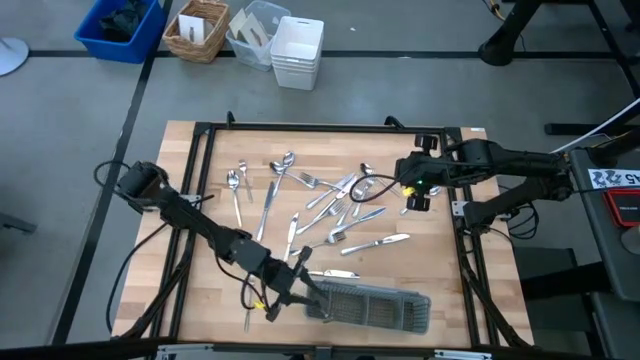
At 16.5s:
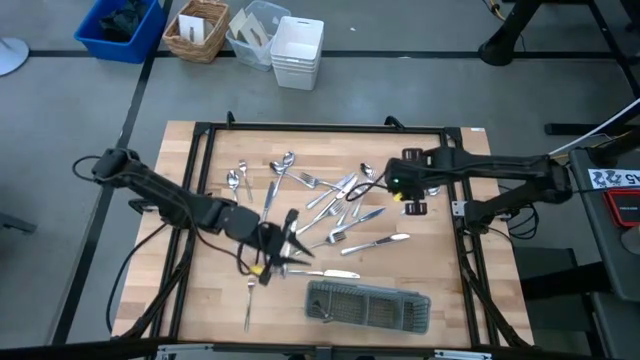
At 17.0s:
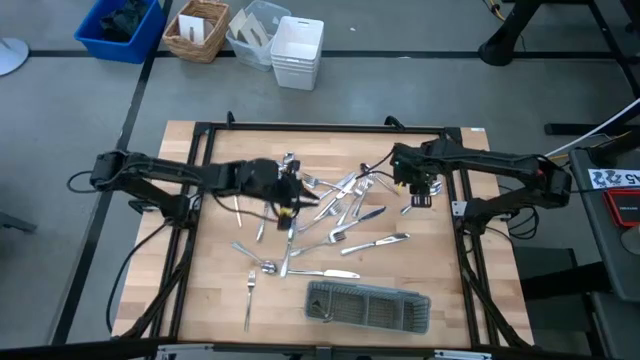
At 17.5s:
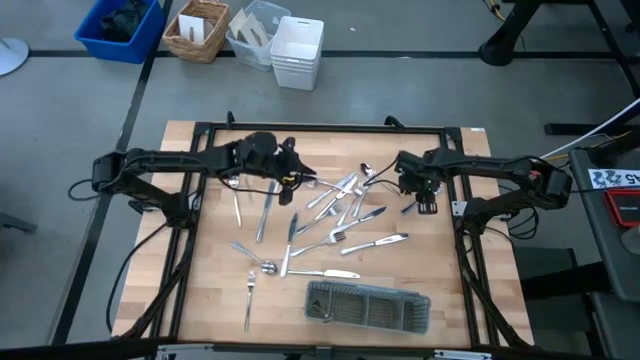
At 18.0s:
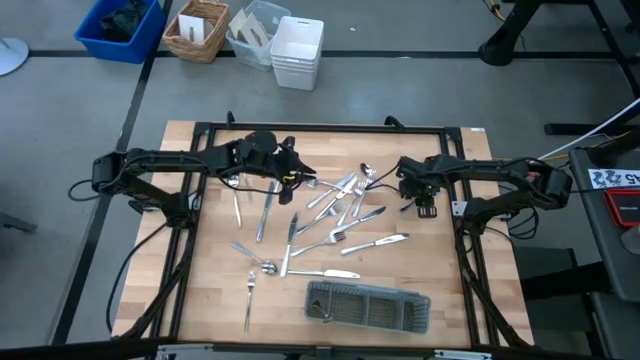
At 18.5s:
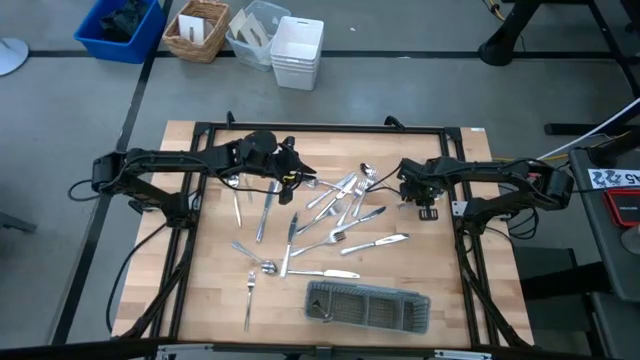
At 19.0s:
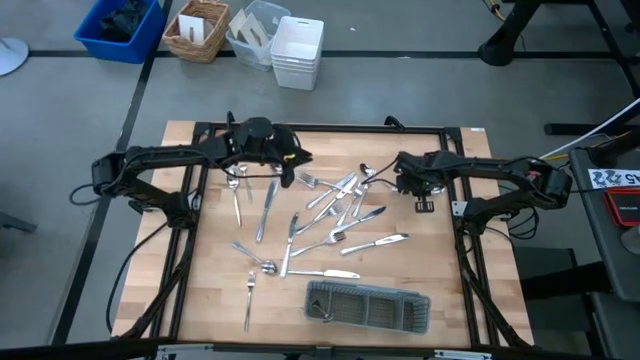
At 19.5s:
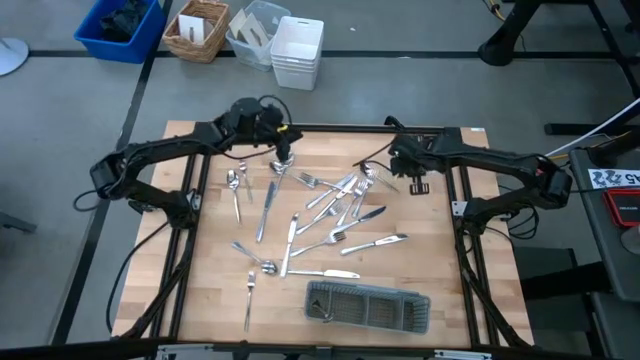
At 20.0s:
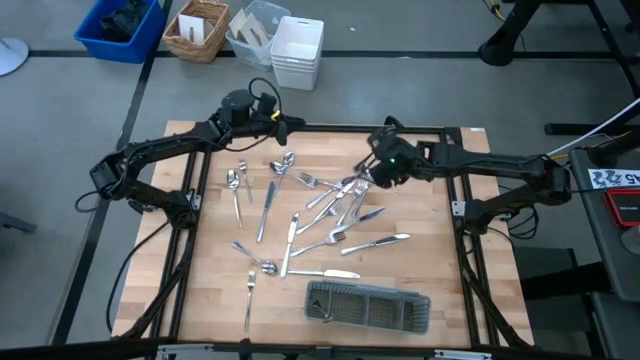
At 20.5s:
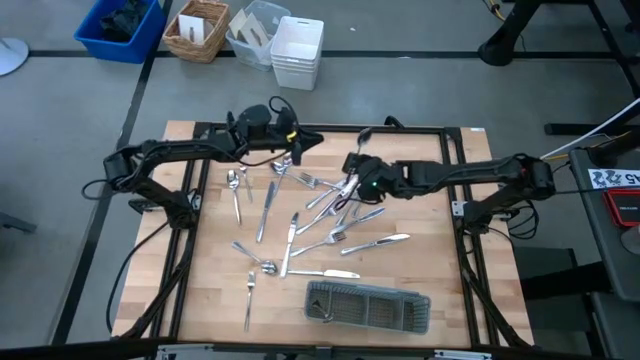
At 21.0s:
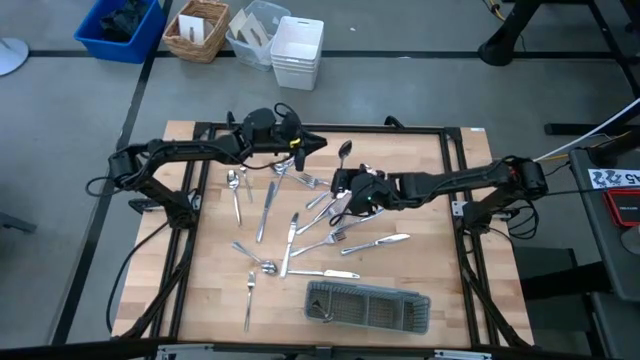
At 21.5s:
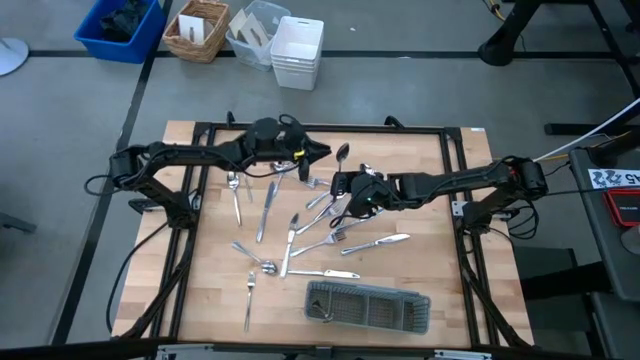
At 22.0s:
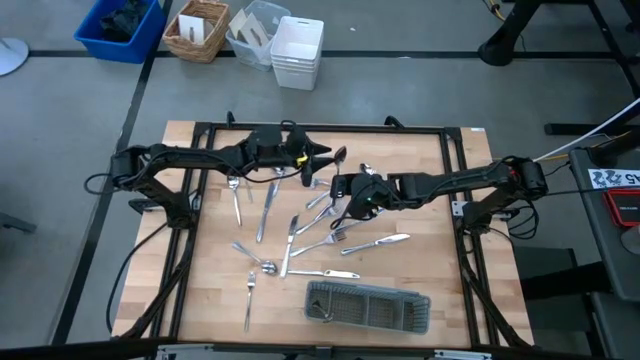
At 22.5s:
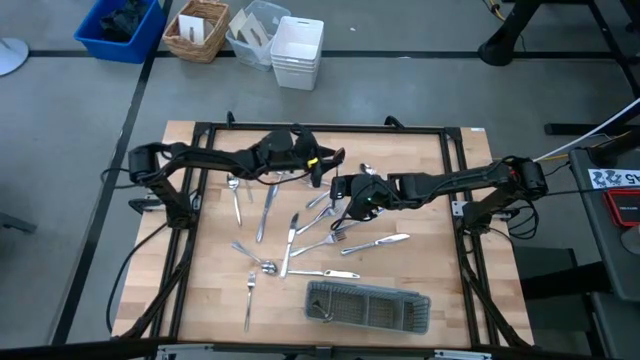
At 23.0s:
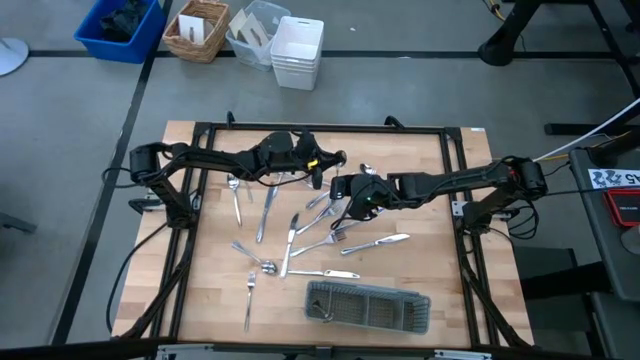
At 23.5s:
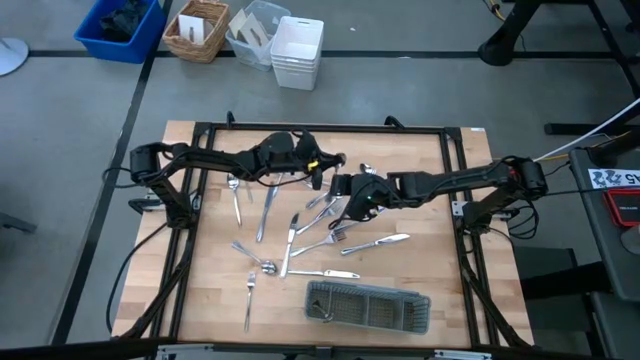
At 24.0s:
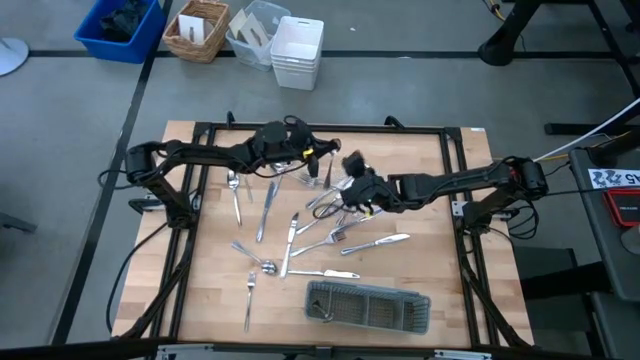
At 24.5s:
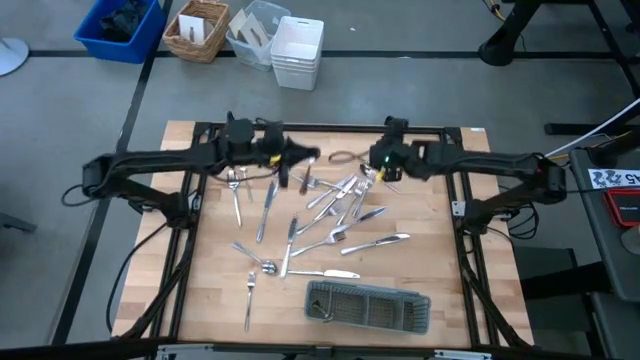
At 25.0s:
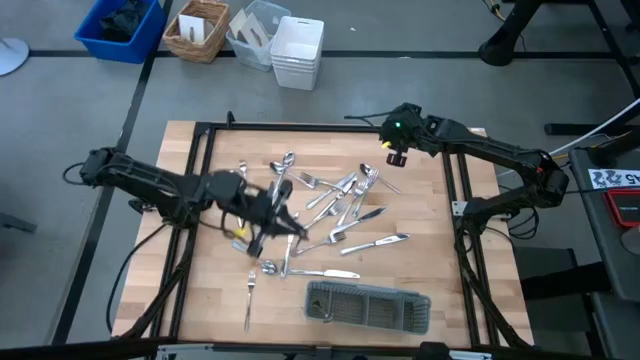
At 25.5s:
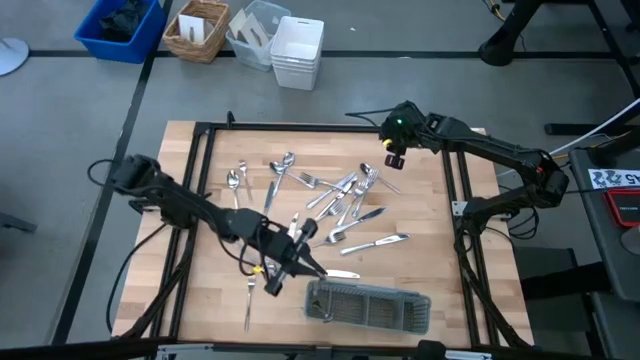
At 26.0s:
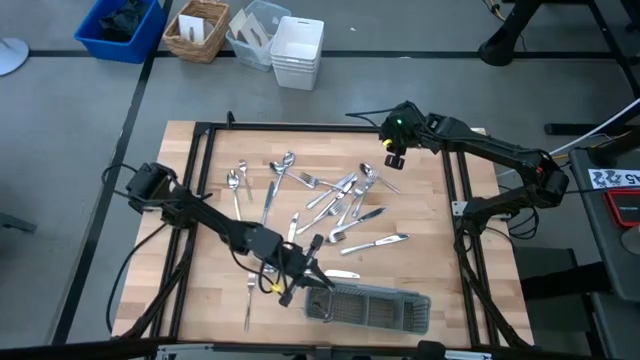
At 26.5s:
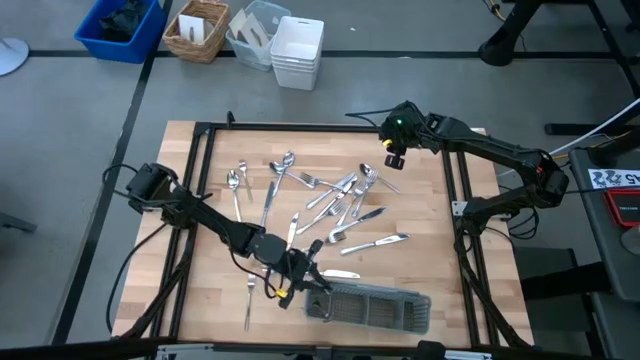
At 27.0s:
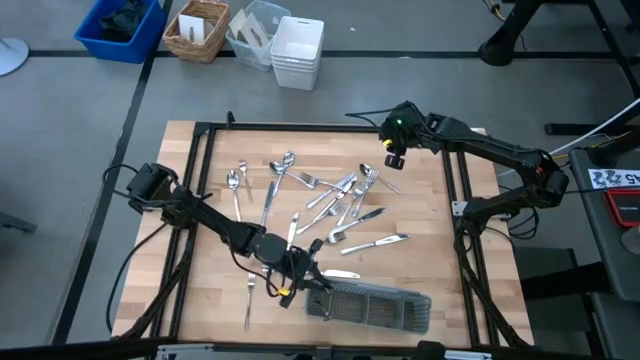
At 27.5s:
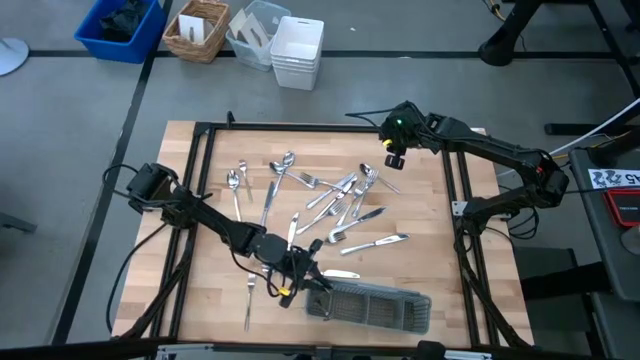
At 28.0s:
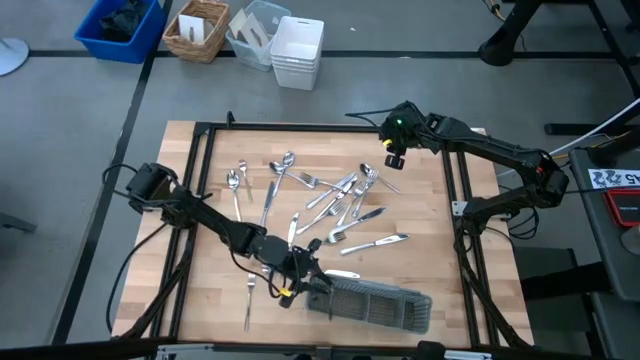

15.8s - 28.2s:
Task: Sort silverware
Put the spoon into the gray silverware rack

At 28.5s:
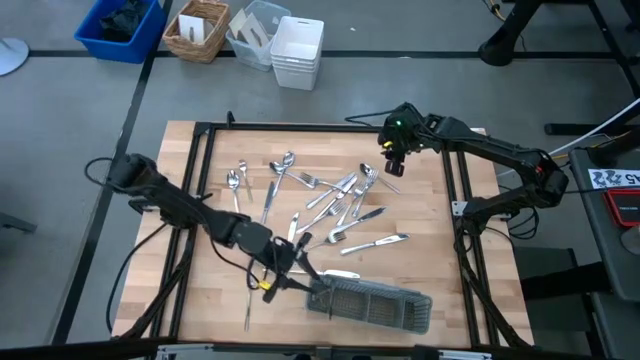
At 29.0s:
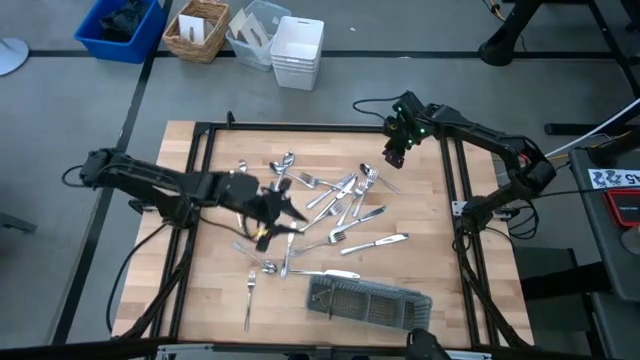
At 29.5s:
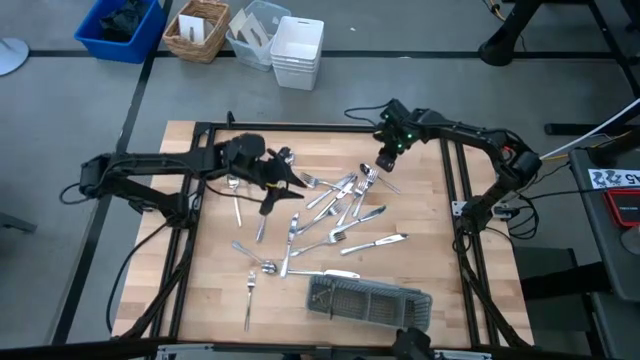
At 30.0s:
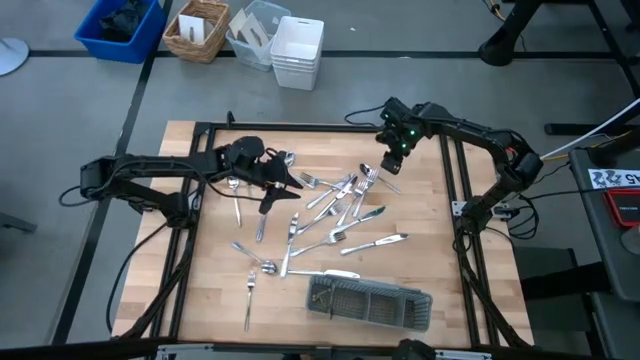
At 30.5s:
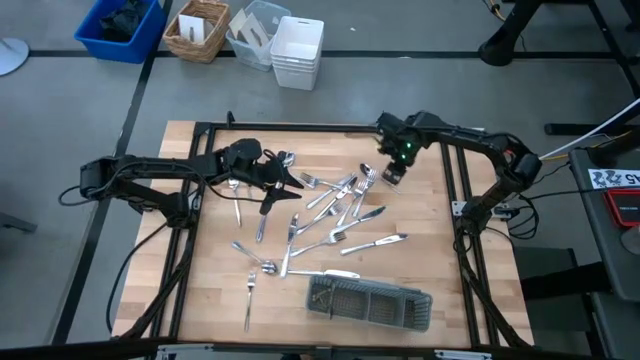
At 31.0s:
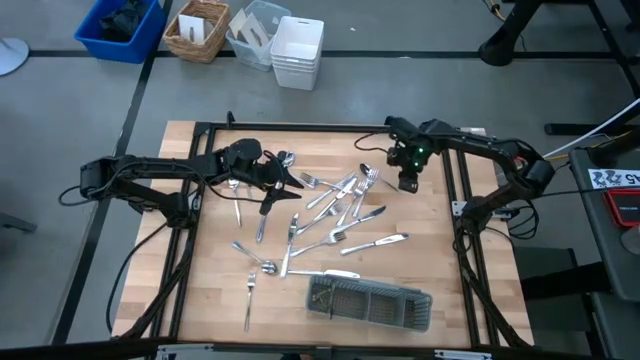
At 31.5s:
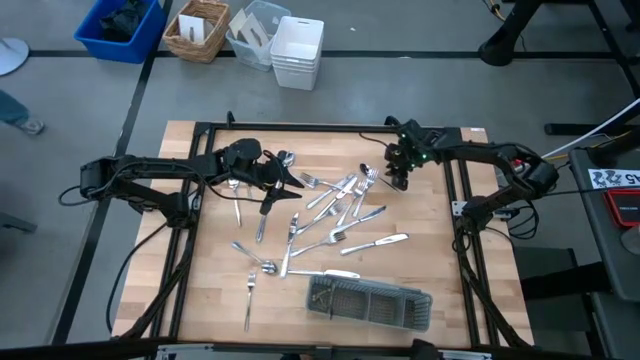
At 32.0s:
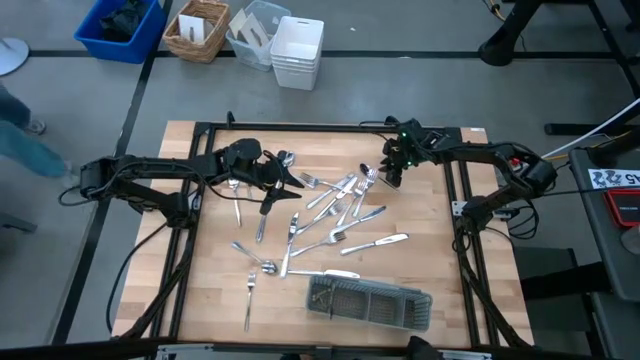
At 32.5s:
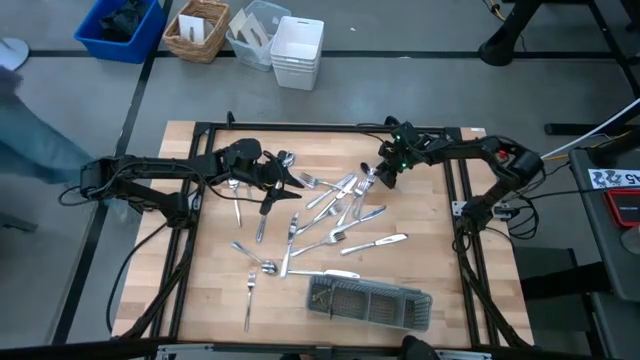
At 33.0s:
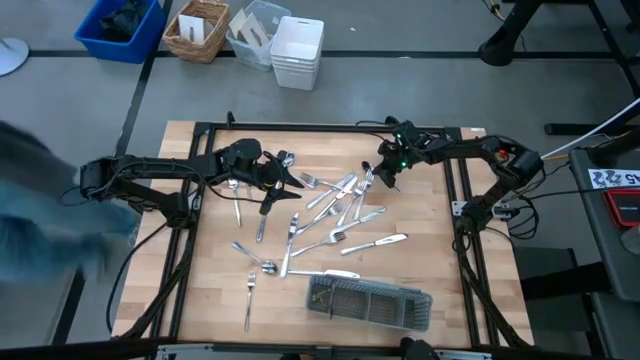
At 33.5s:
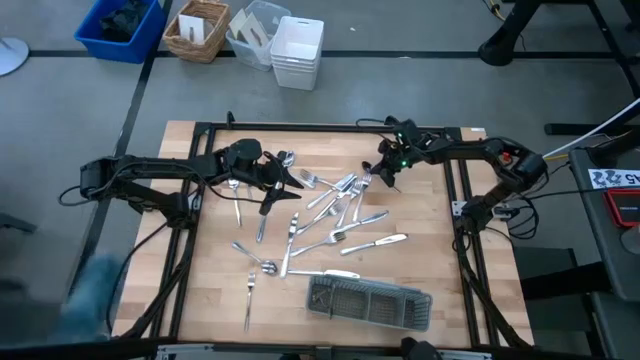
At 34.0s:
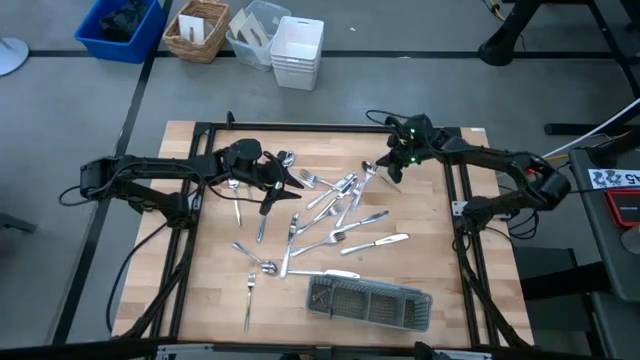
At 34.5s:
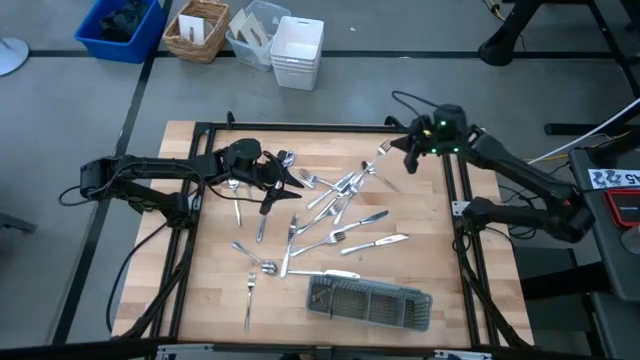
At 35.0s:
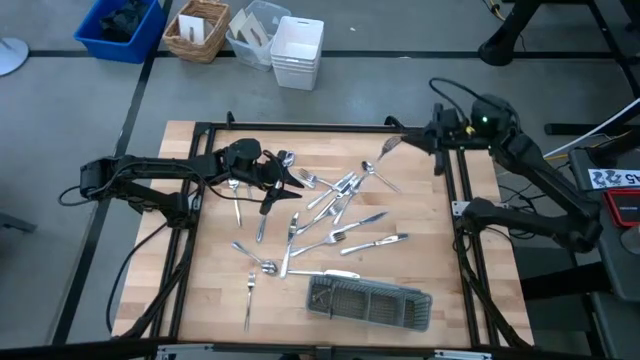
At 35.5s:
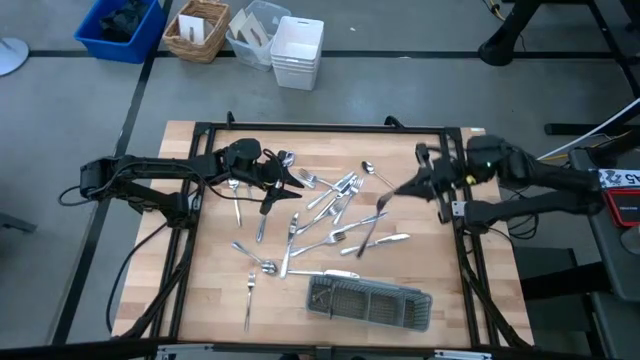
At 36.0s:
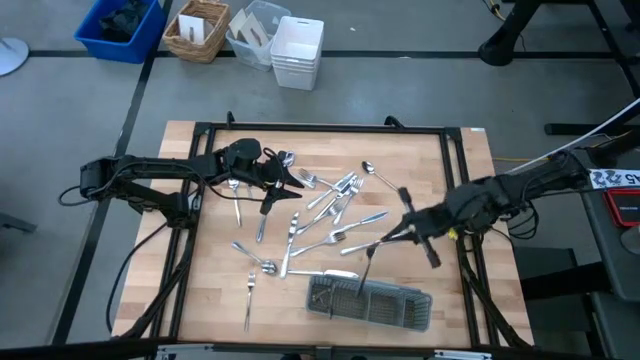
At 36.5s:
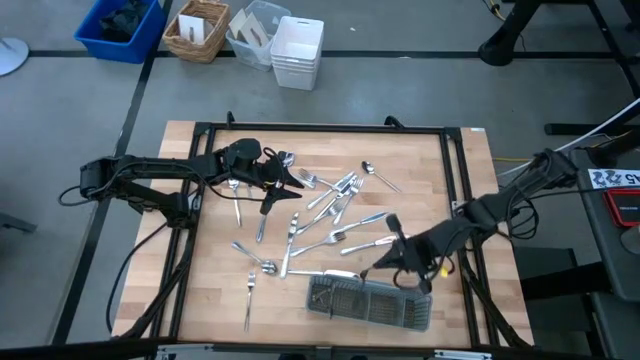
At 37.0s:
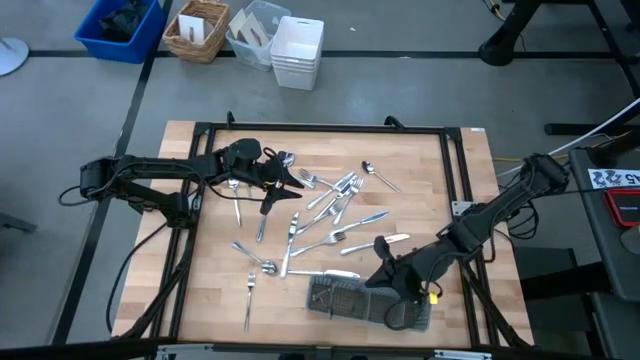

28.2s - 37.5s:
Put the fork into the gray silverware rack

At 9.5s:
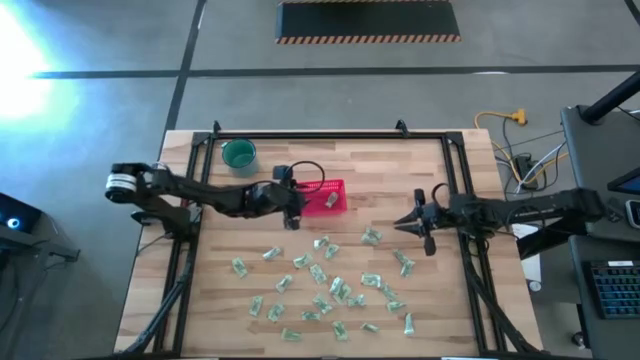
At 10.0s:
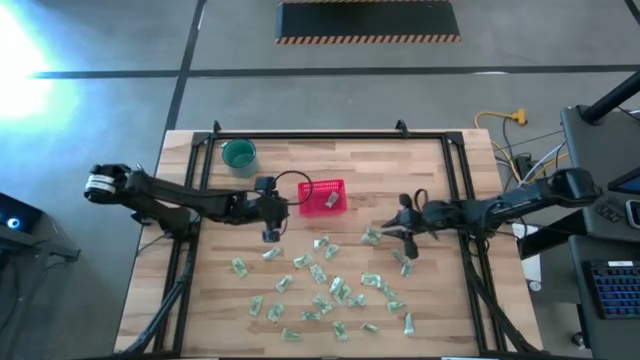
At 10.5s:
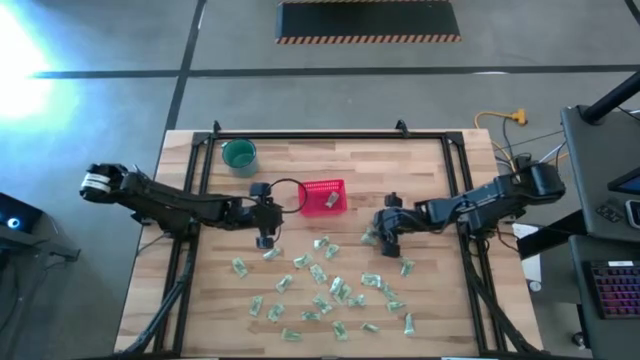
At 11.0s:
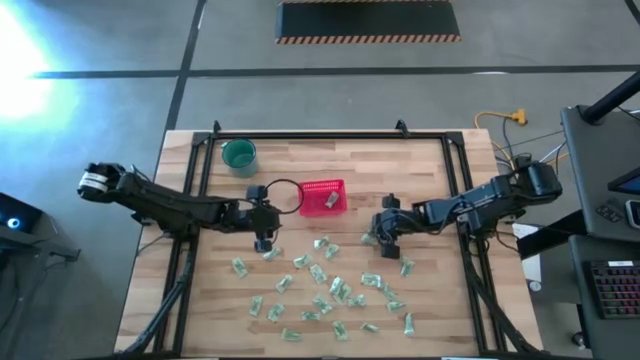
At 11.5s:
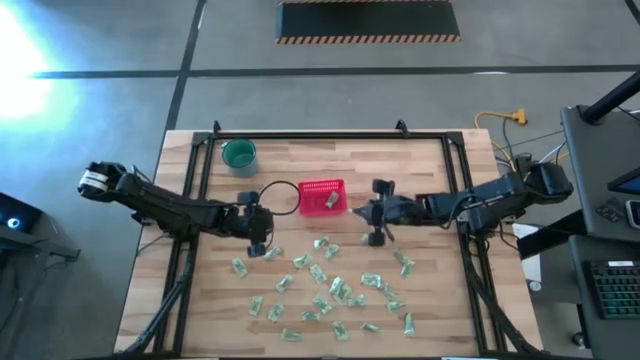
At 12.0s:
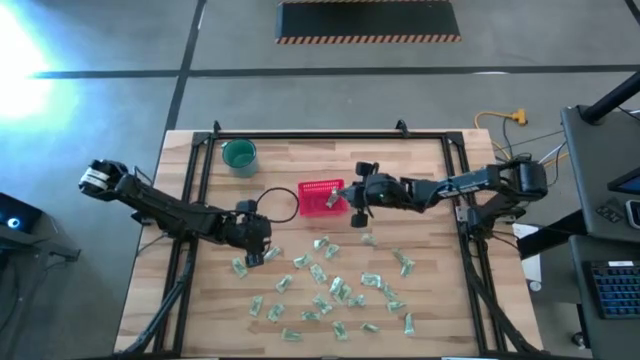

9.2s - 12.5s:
Task: Pick and place items into bin
Put the stevia packet into the red bin
